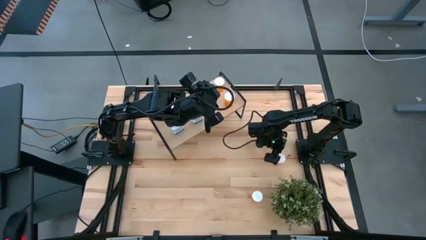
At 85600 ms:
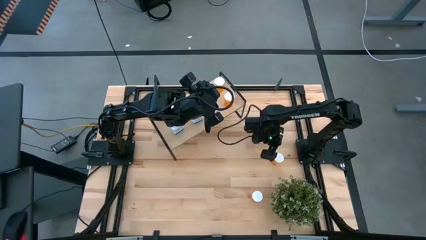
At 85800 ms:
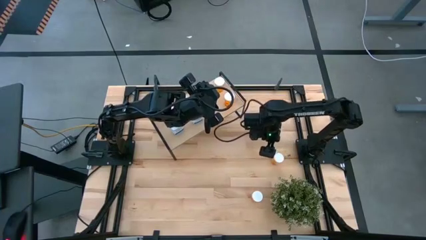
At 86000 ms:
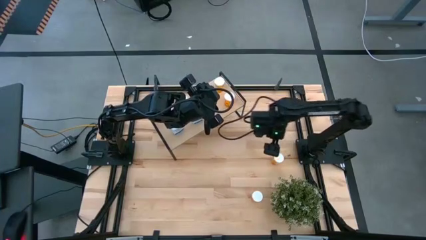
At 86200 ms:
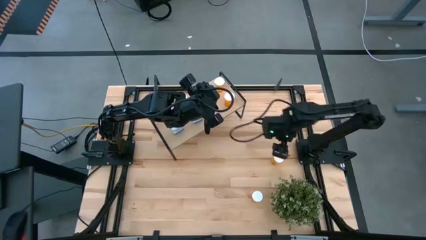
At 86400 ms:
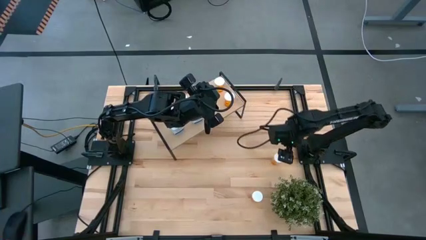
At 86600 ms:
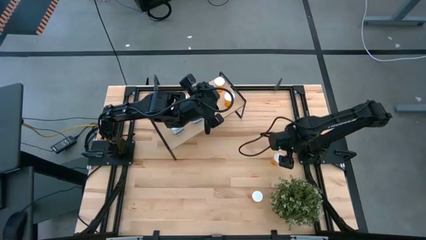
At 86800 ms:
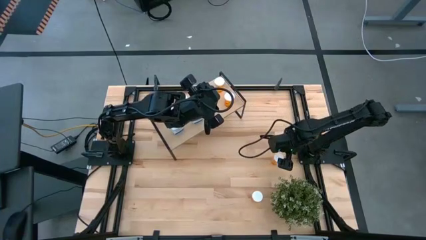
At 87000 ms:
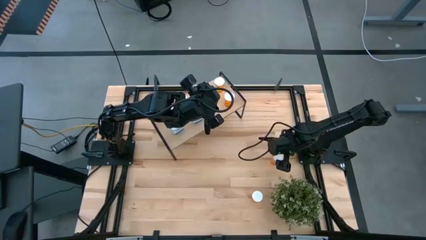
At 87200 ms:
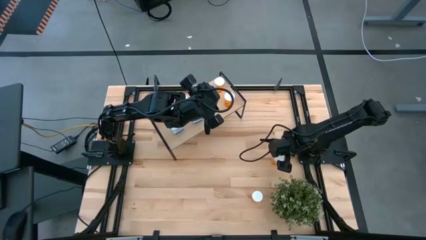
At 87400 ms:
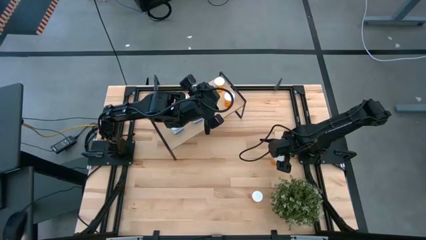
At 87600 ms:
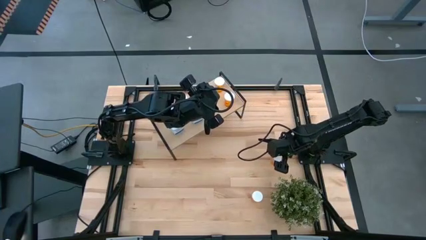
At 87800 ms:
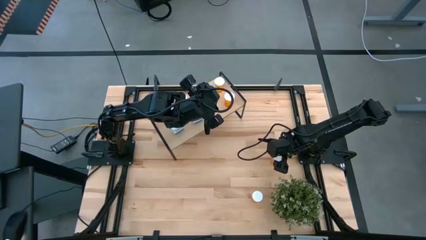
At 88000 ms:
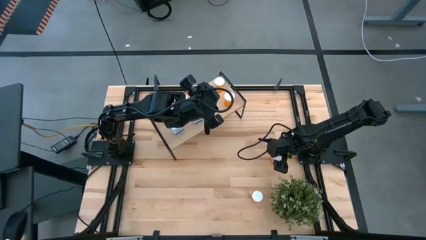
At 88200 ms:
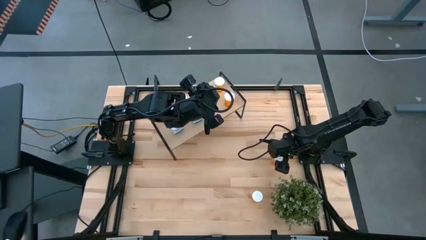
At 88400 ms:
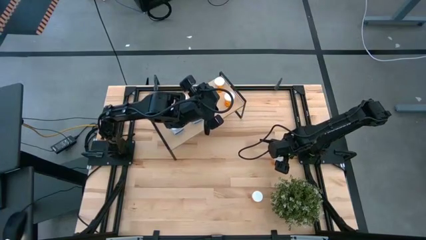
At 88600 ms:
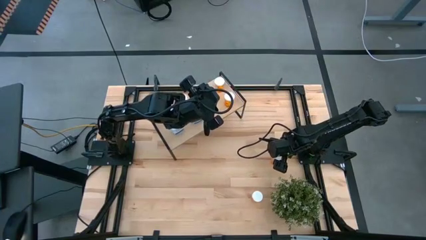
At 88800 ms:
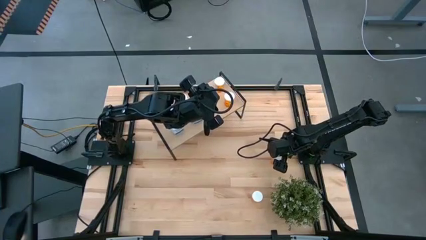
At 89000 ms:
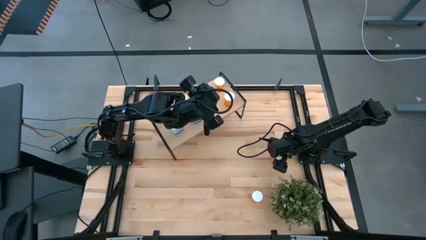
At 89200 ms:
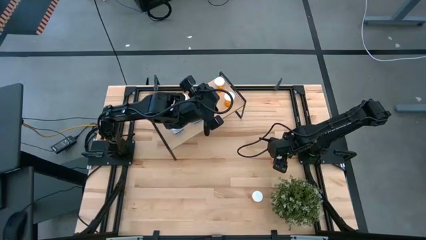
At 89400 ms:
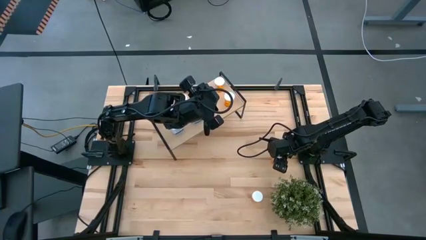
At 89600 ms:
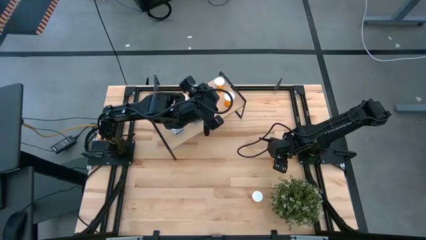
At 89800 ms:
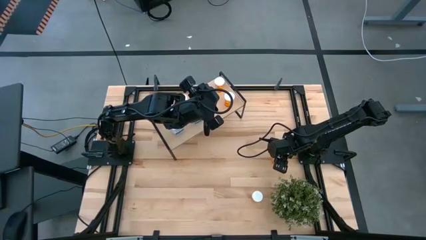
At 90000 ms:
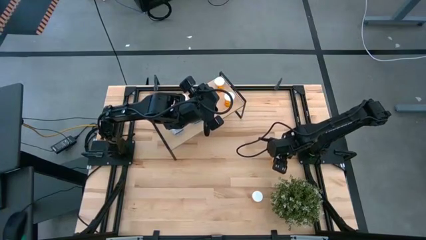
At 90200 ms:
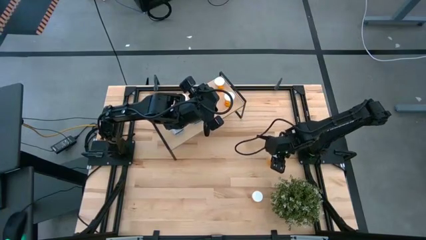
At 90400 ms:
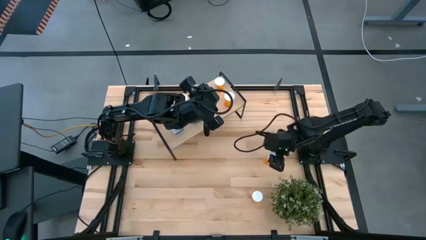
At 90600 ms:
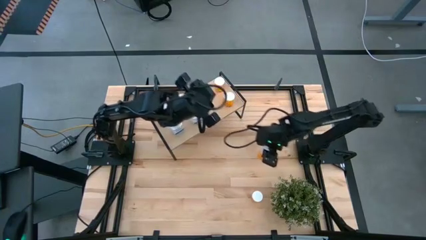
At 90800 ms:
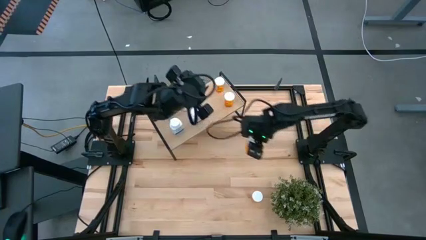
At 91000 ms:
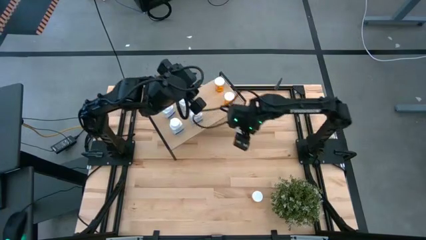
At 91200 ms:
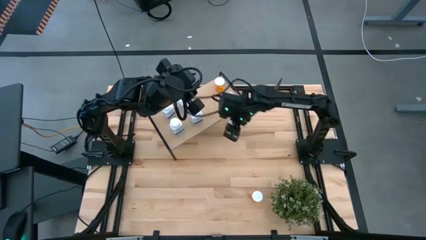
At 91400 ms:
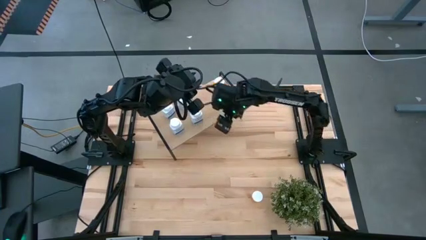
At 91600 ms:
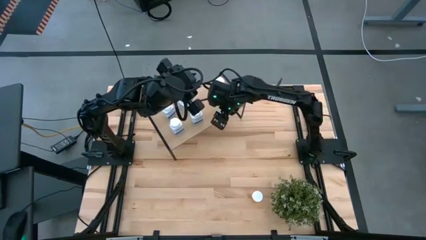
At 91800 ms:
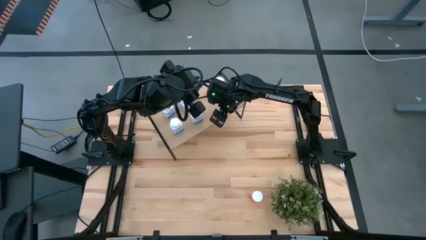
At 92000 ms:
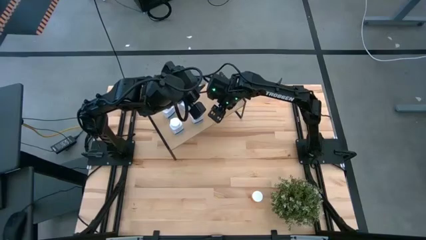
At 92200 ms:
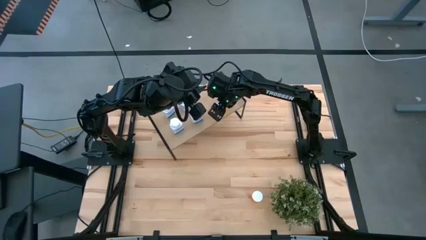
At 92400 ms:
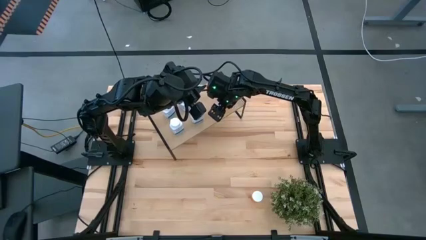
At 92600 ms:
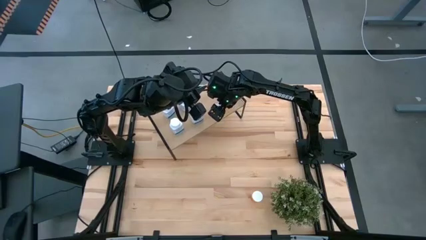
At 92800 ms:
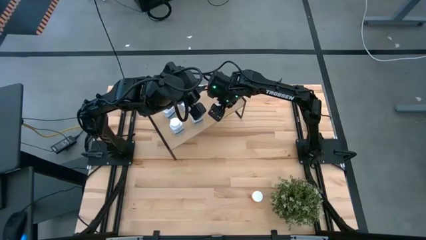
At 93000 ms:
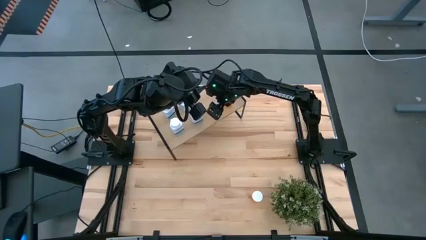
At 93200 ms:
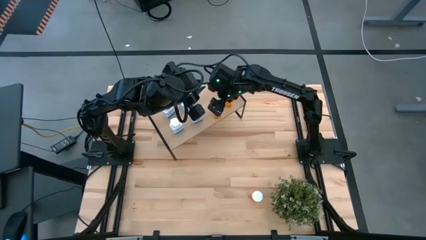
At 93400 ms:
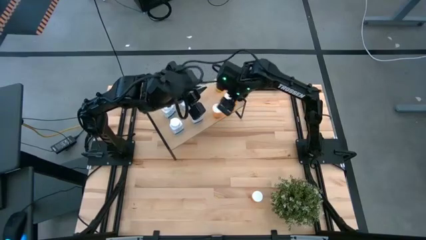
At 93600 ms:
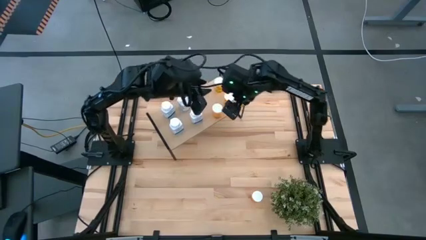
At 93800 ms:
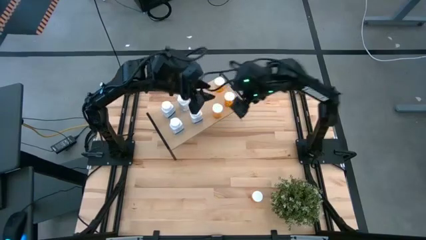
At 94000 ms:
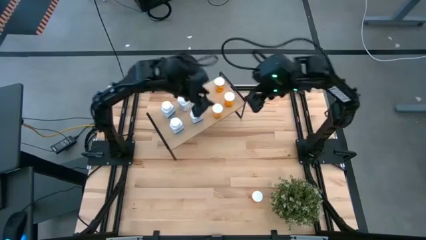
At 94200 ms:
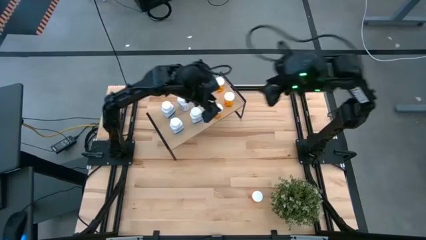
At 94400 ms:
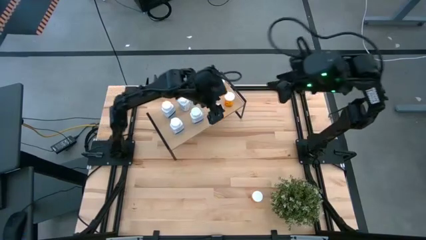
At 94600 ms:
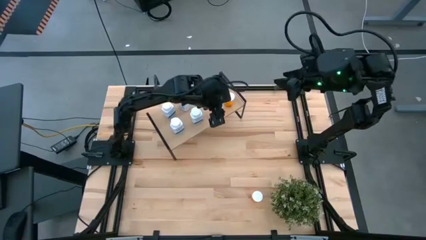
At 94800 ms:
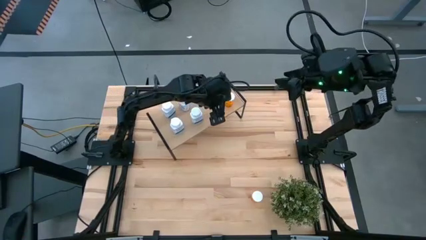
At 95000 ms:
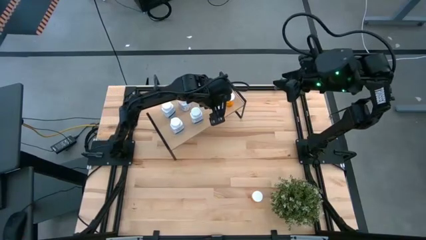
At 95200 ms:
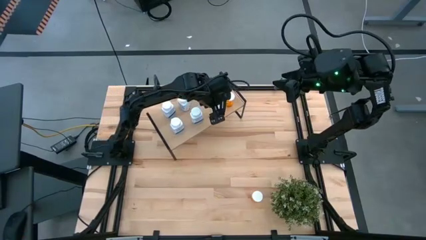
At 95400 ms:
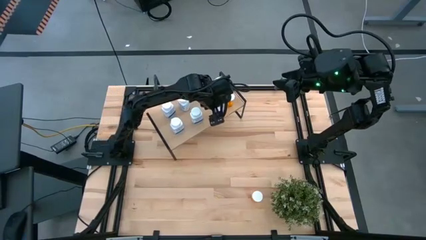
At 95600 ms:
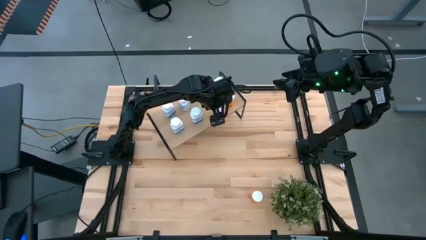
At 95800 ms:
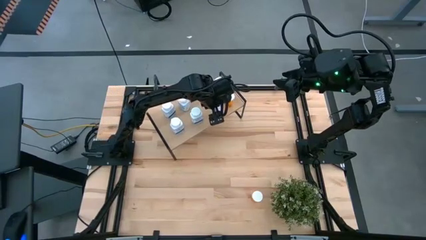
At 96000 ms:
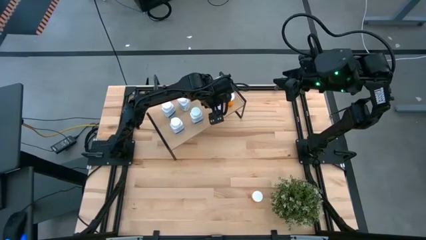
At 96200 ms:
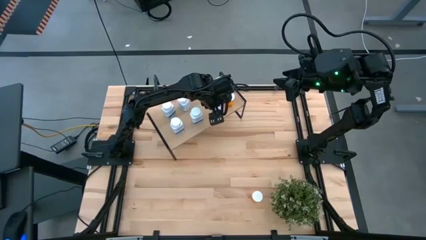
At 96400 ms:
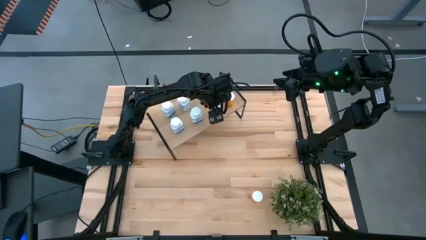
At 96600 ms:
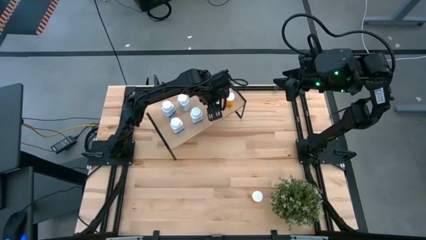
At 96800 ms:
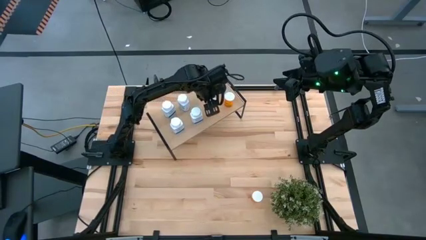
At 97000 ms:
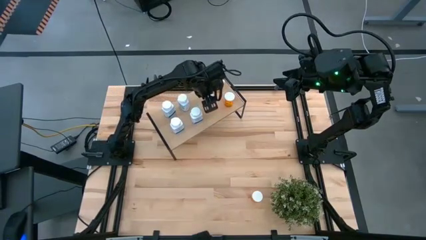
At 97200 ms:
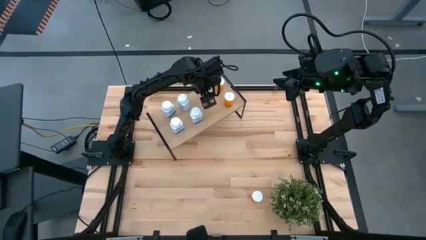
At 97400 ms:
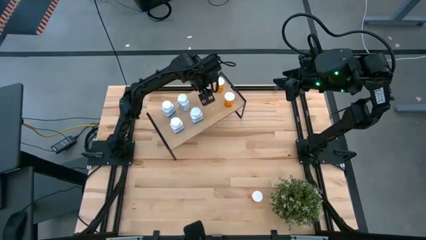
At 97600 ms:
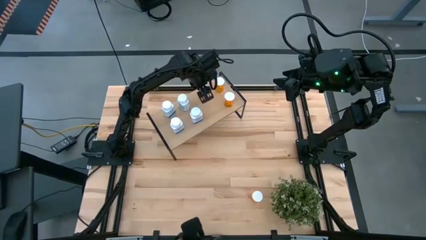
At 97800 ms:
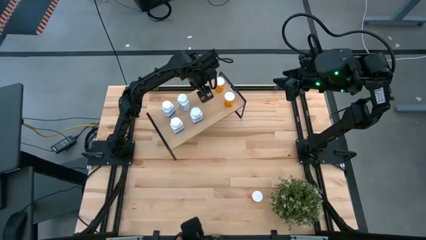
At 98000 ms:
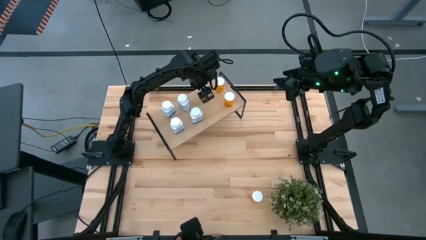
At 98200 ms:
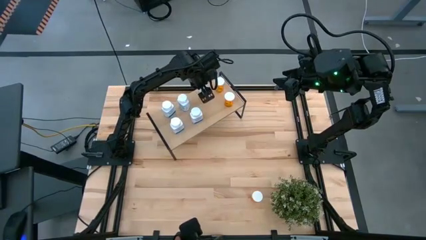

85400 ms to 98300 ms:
Task: Pick and place medicine bottles onto shelf by color
Put the orange pill bottle on the shelf
